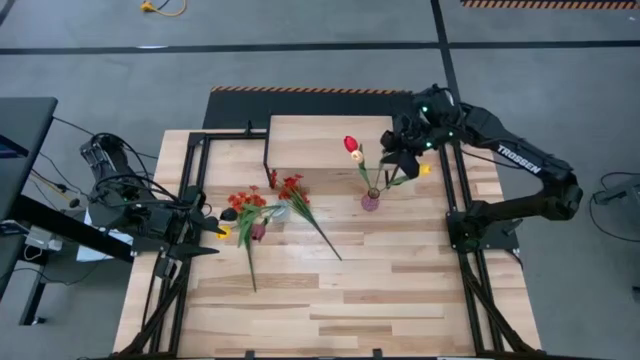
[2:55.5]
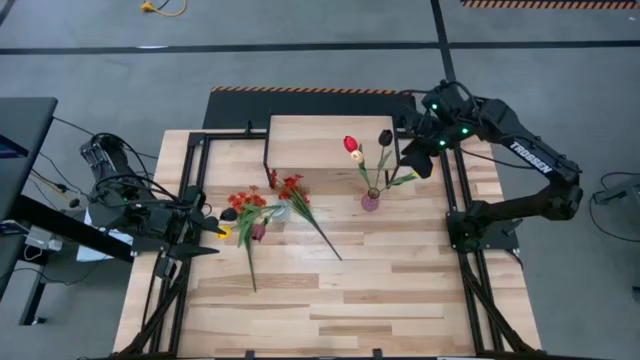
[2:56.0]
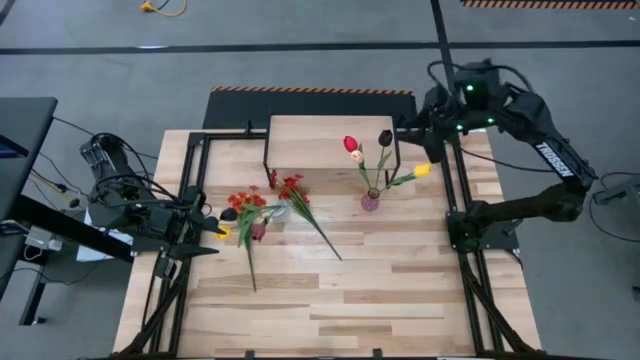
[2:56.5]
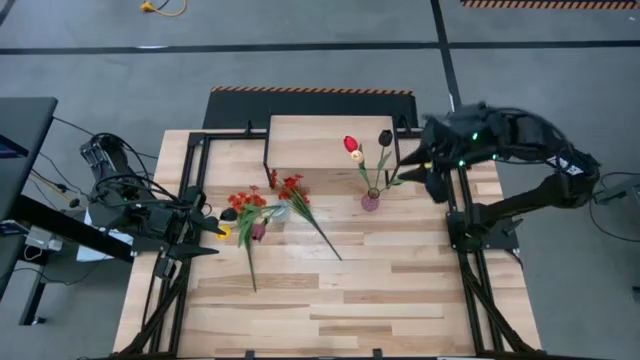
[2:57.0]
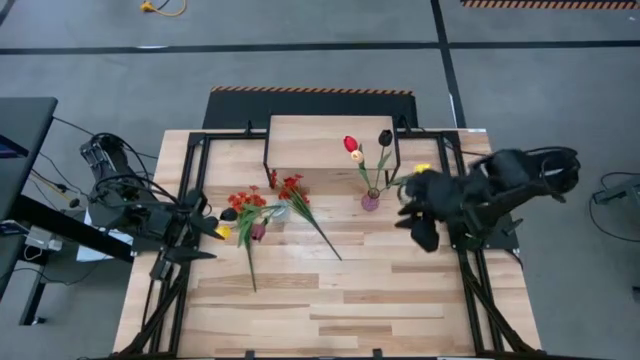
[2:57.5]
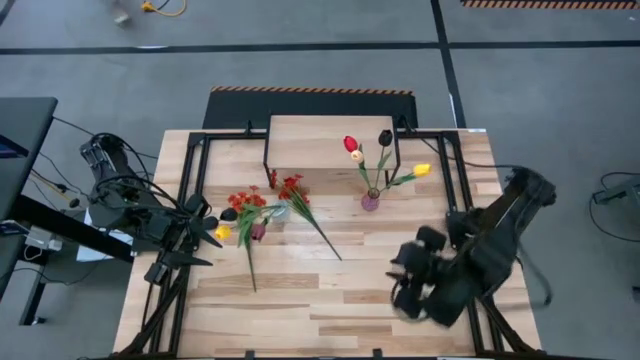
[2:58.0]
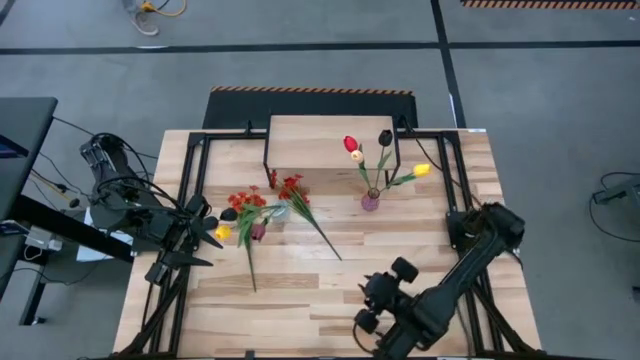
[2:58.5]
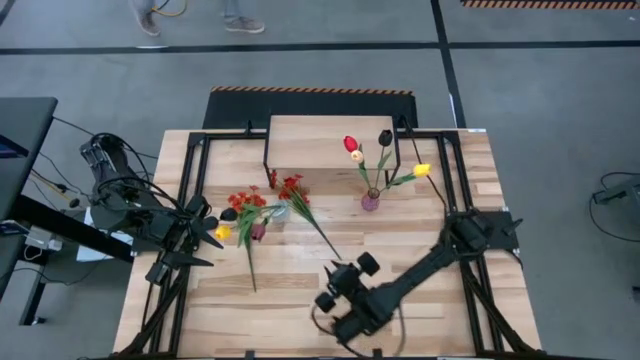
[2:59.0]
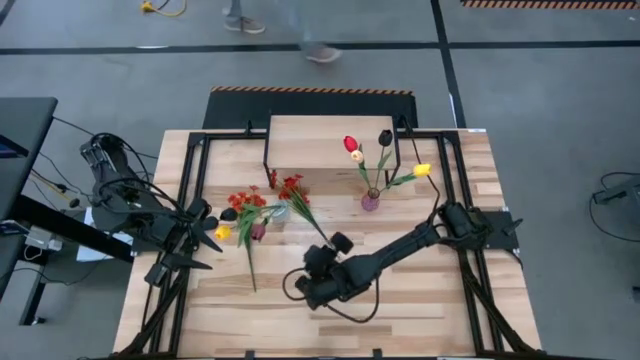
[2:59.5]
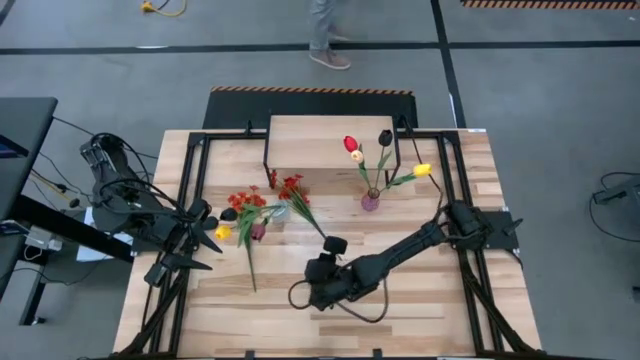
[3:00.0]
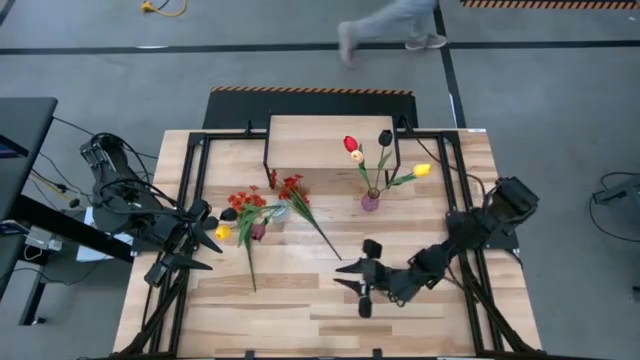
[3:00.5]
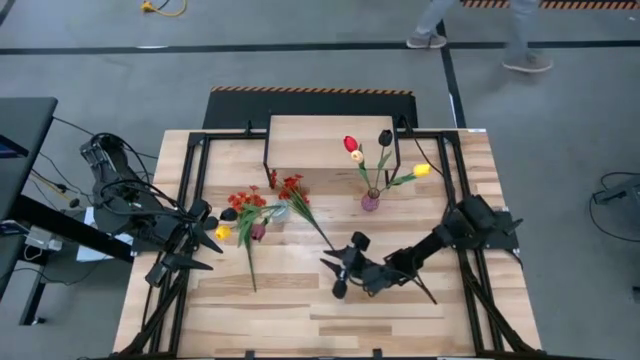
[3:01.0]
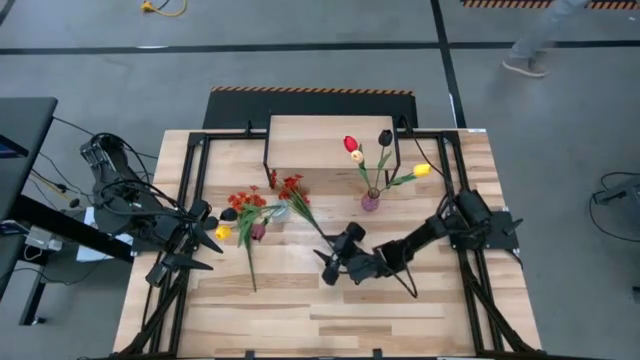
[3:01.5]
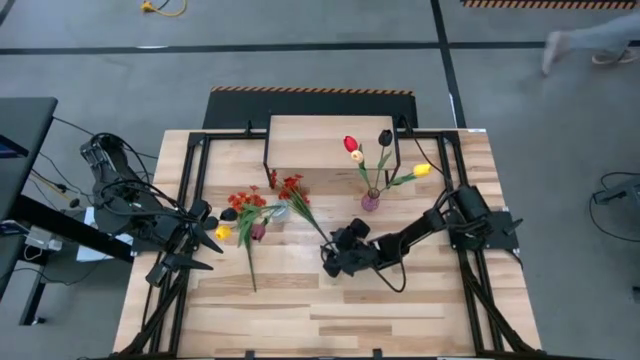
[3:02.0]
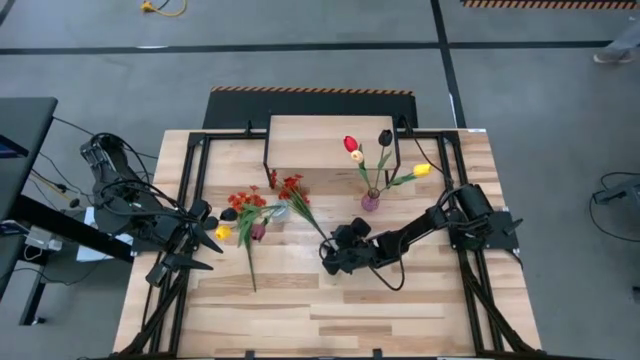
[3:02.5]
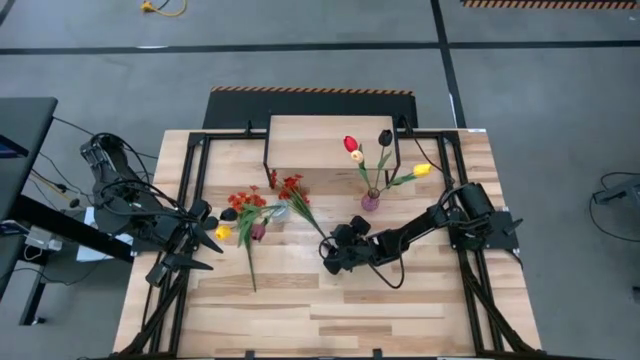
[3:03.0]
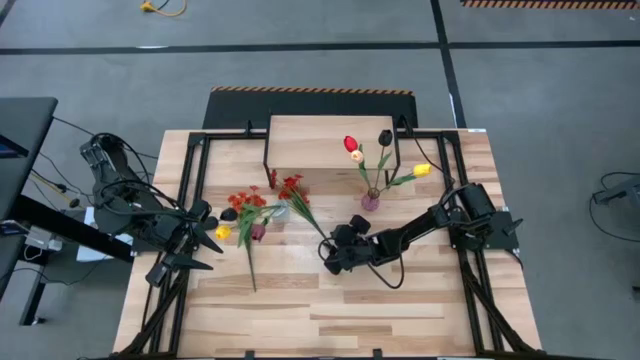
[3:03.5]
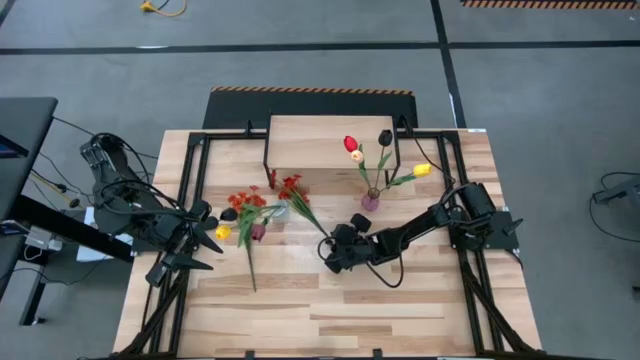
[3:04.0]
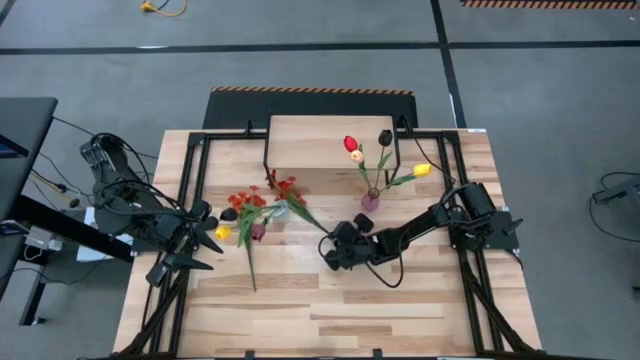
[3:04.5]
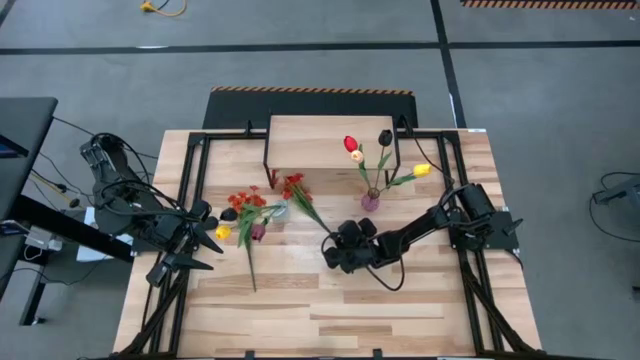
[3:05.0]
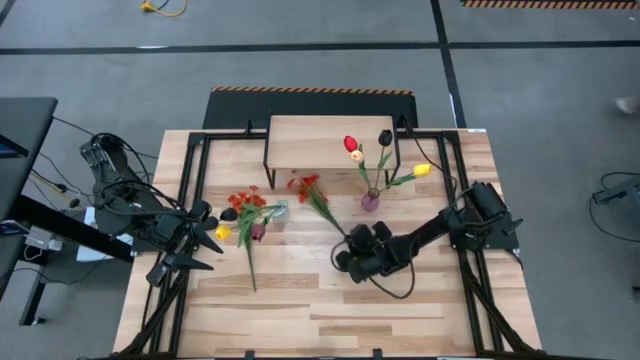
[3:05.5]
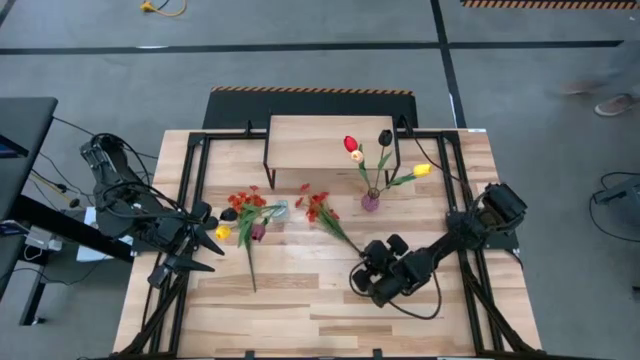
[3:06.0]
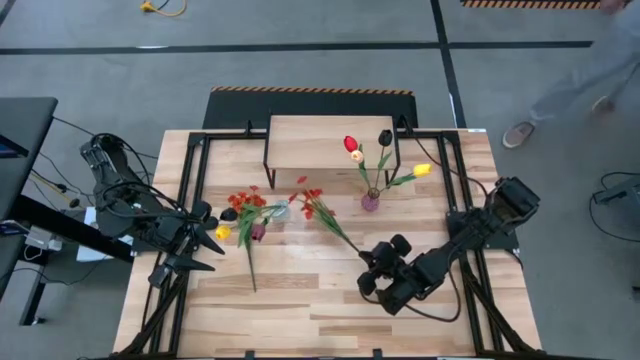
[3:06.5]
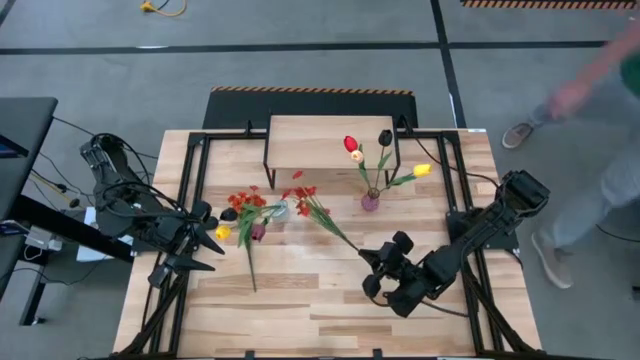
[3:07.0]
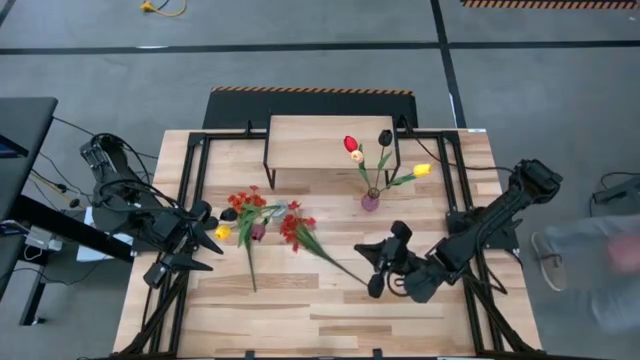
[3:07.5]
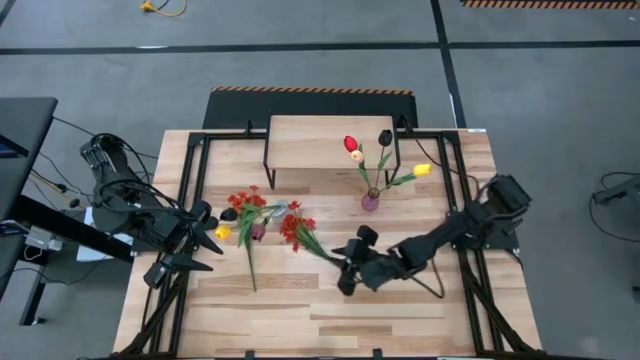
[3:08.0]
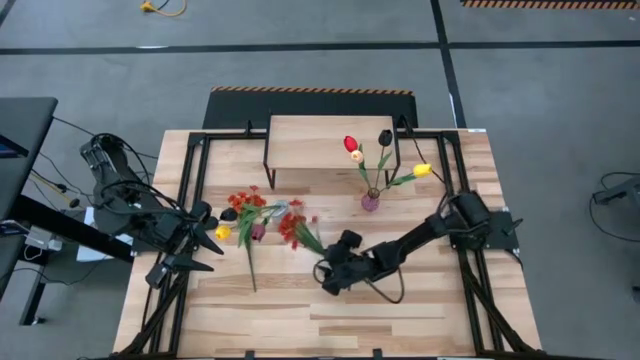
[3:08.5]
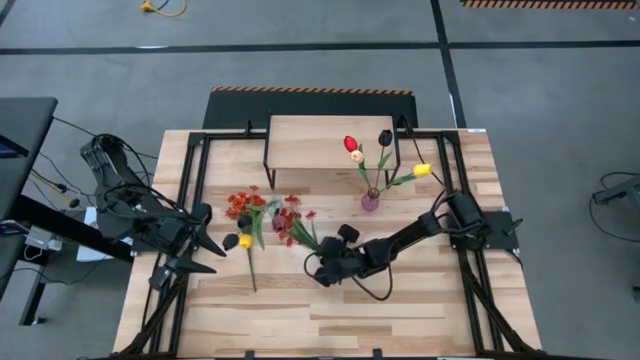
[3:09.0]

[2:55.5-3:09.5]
Task: Pick and place flowers into a vace then onto a shelf
Put the right red flower into the purple vase

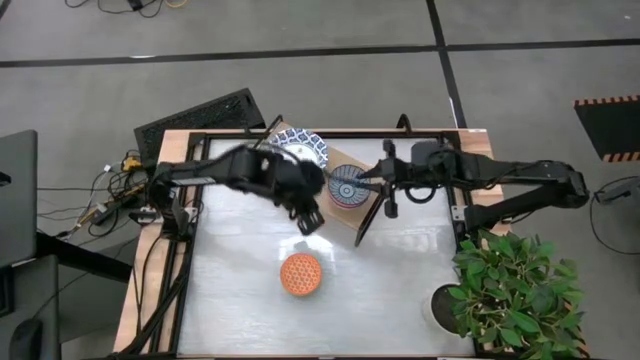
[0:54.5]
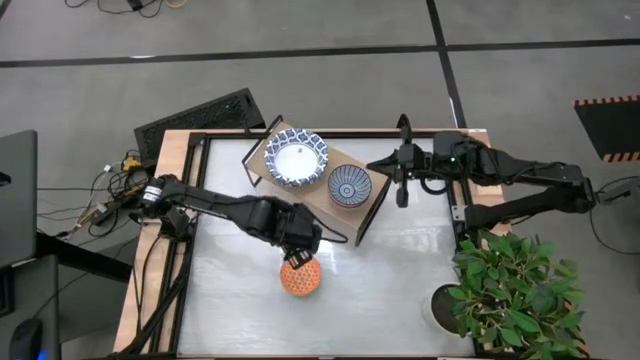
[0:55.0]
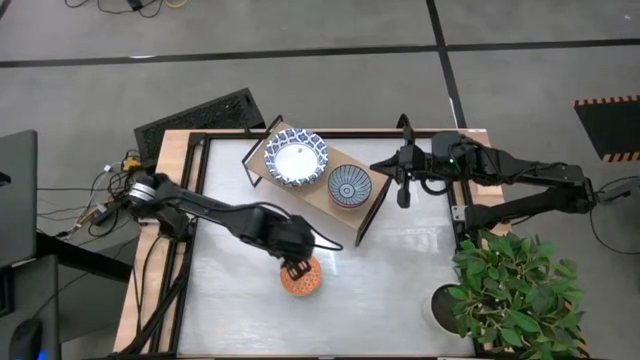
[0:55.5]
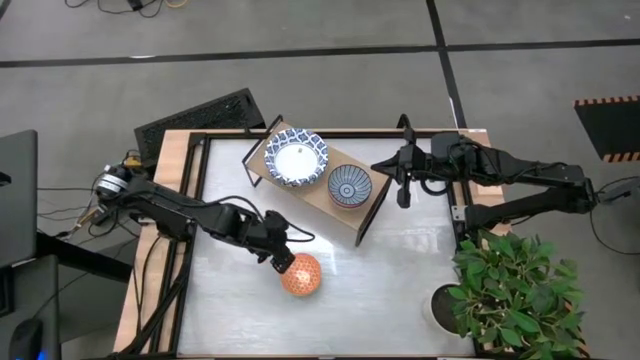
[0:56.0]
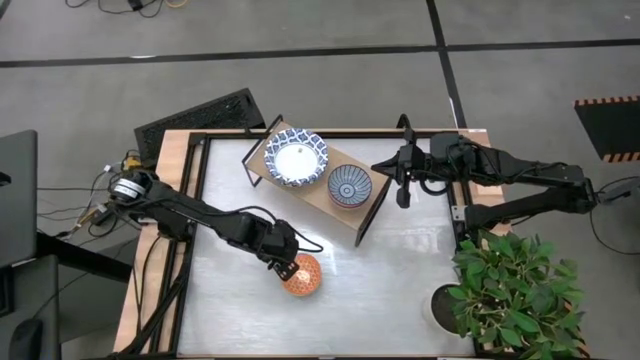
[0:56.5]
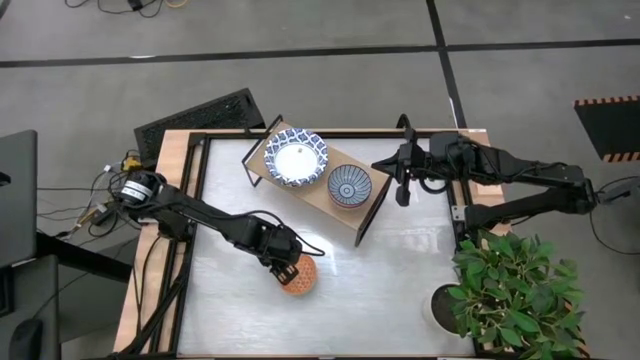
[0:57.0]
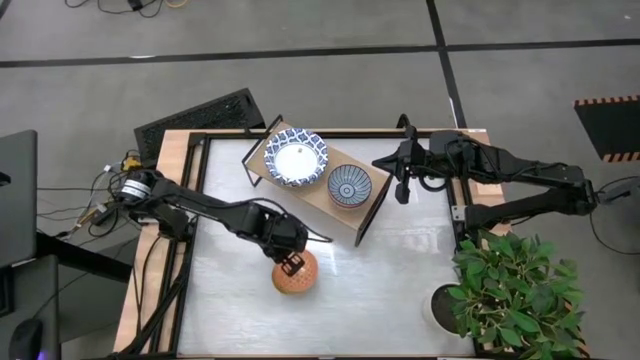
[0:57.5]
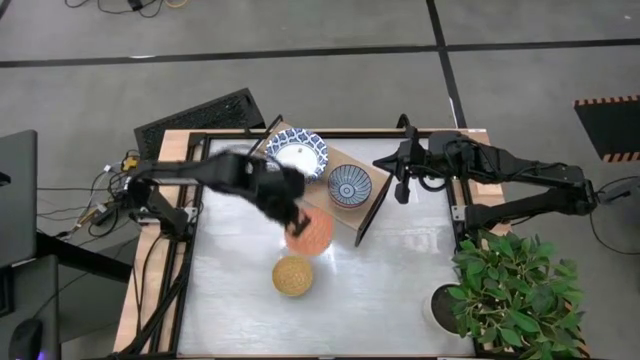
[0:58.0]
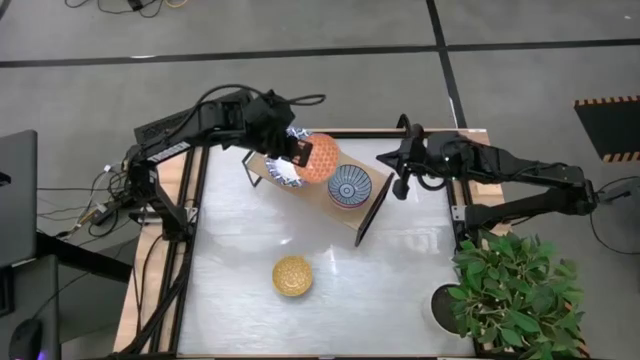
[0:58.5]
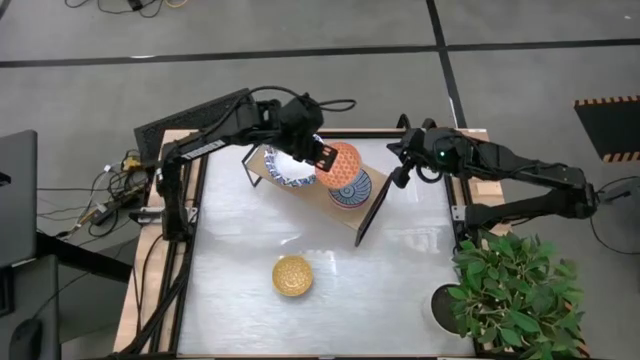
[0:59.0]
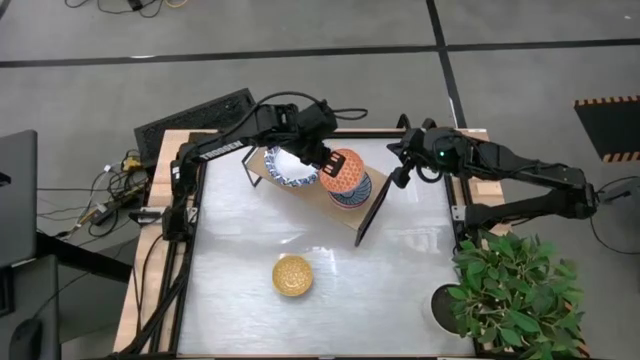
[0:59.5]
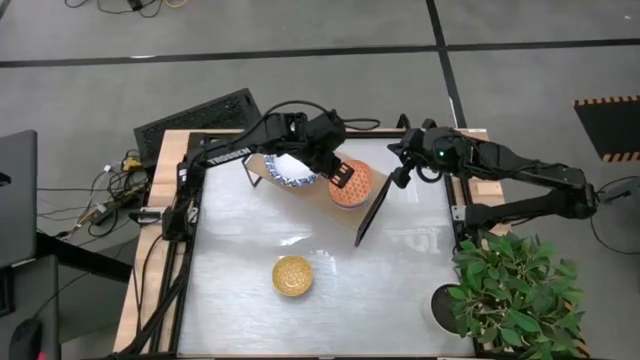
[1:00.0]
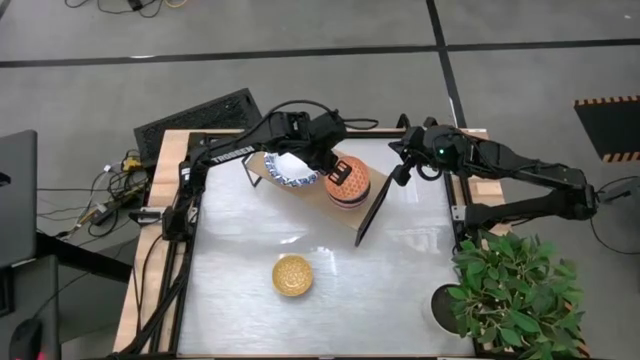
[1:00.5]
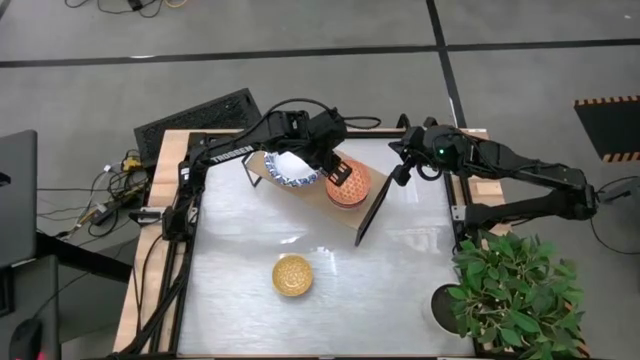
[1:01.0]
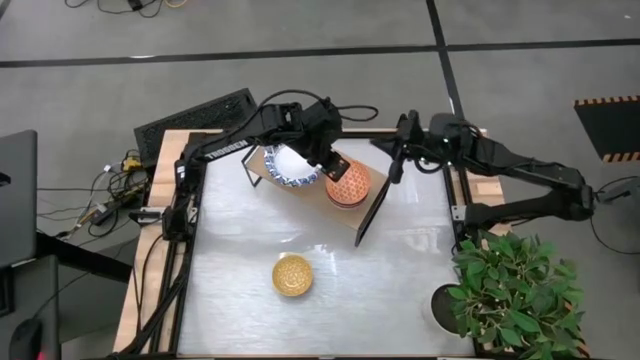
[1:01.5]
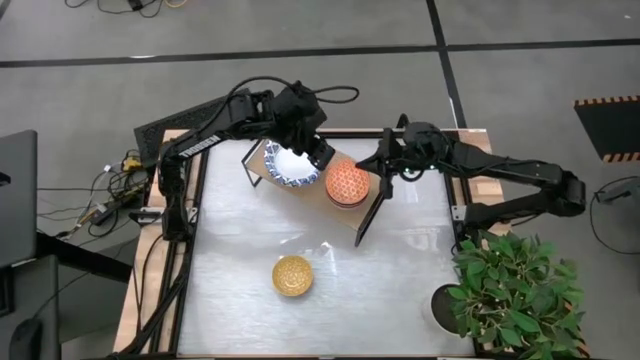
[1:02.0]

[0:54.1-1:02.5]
Task: Place and stack bowls onto a shelf
Stack the orange bowl on top of the blue bowl on the shelf
